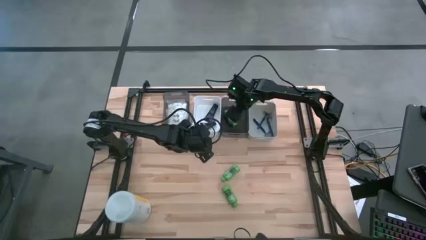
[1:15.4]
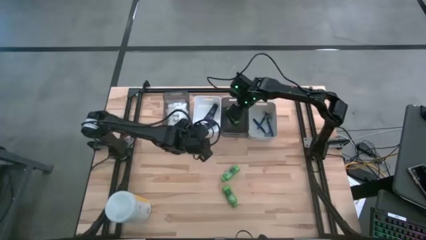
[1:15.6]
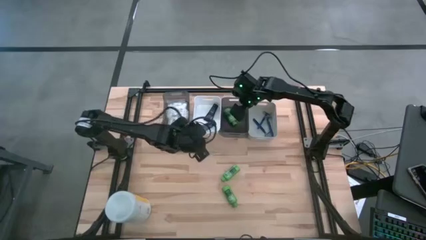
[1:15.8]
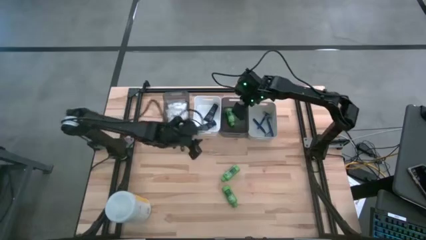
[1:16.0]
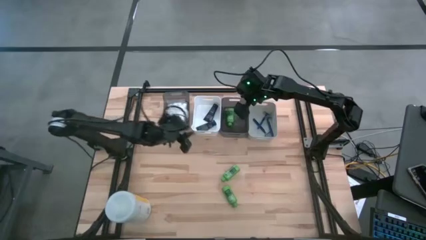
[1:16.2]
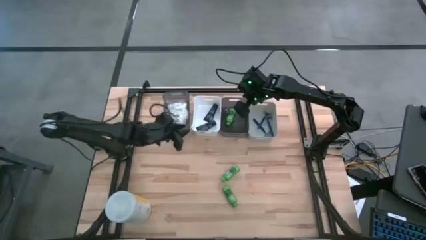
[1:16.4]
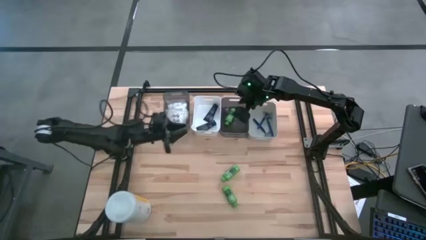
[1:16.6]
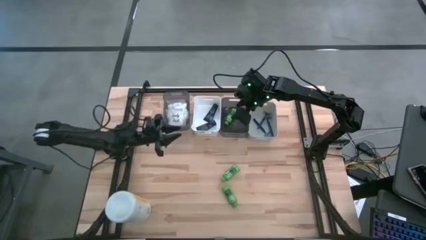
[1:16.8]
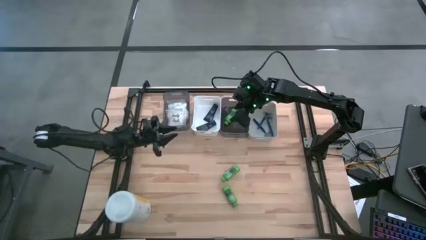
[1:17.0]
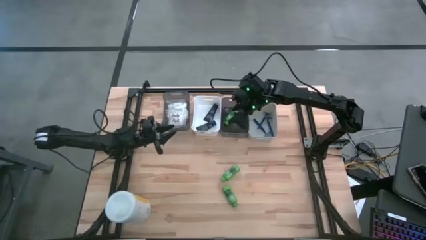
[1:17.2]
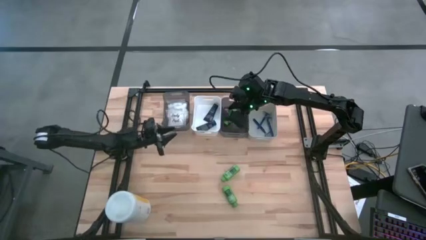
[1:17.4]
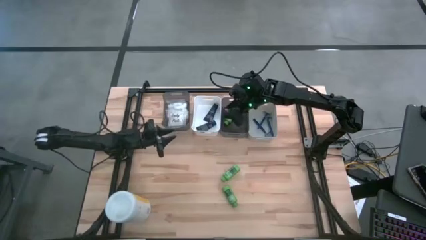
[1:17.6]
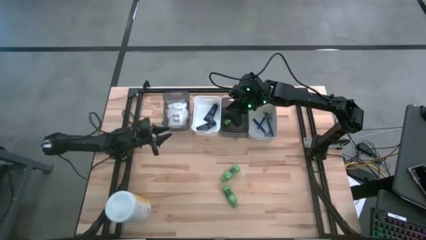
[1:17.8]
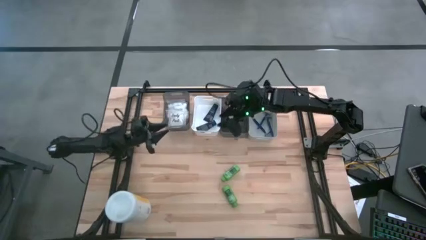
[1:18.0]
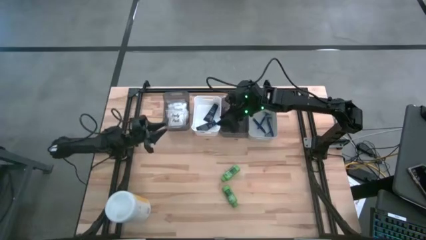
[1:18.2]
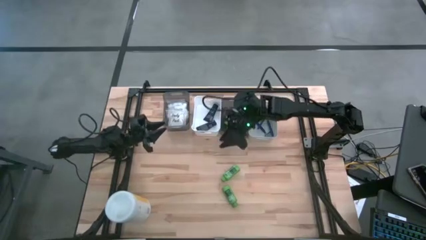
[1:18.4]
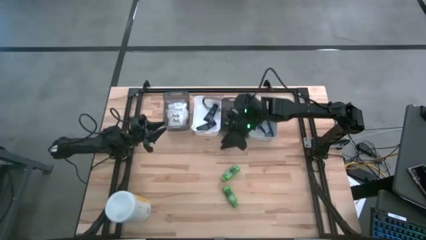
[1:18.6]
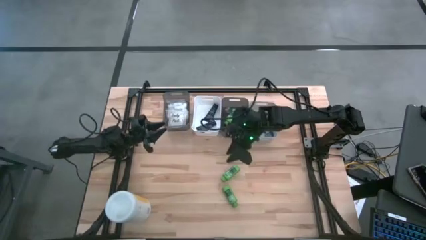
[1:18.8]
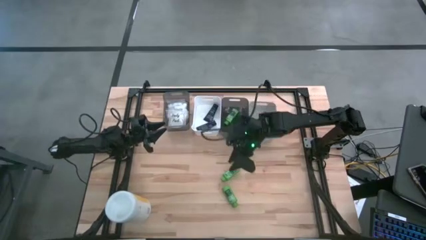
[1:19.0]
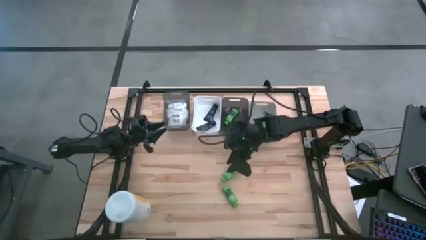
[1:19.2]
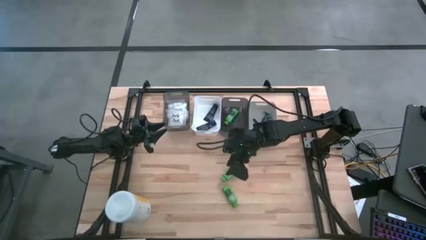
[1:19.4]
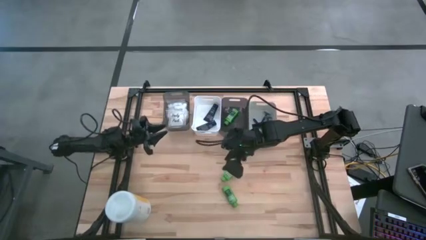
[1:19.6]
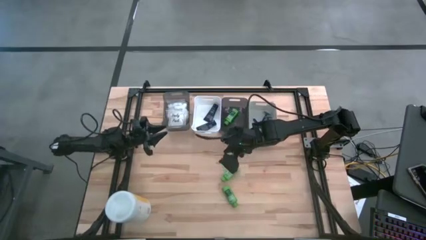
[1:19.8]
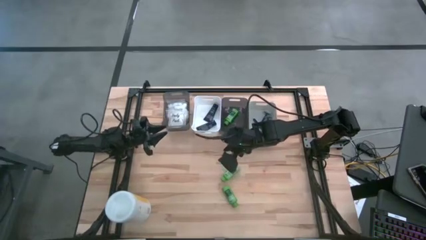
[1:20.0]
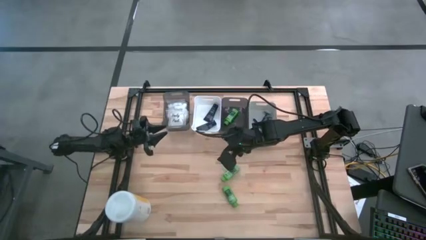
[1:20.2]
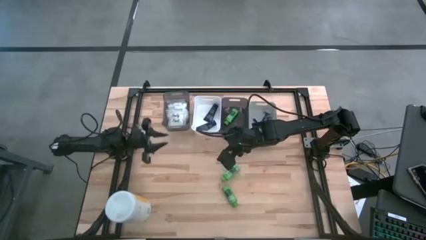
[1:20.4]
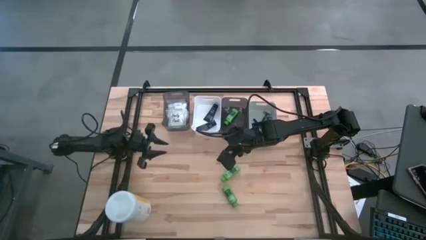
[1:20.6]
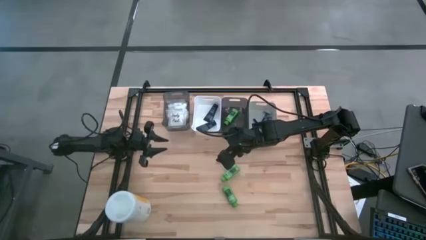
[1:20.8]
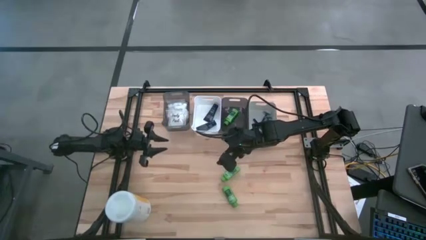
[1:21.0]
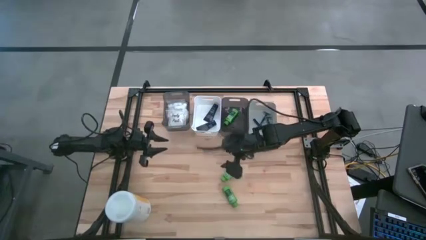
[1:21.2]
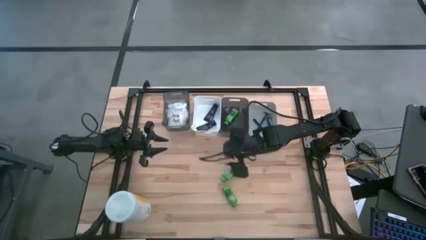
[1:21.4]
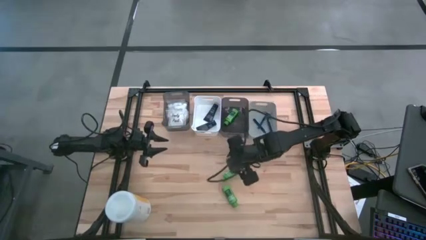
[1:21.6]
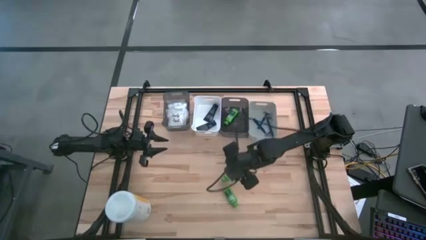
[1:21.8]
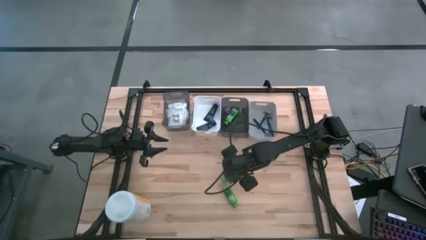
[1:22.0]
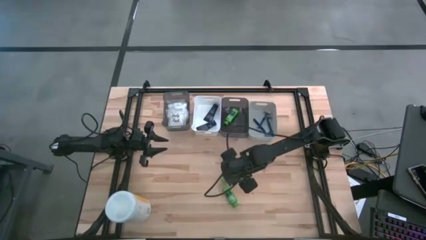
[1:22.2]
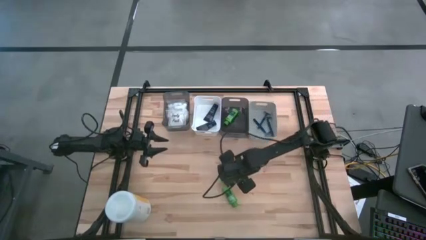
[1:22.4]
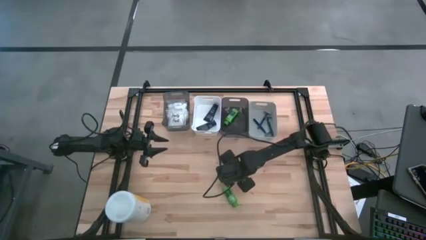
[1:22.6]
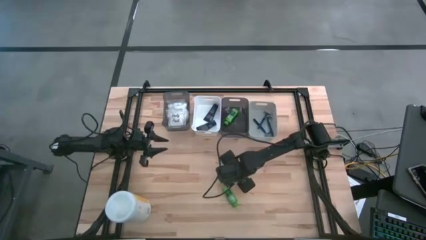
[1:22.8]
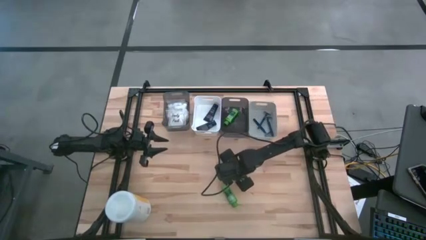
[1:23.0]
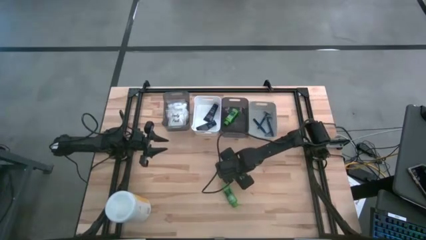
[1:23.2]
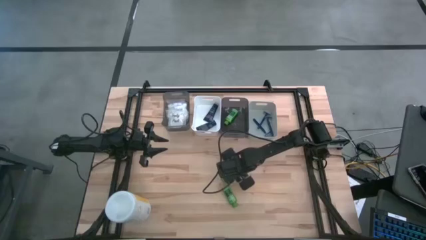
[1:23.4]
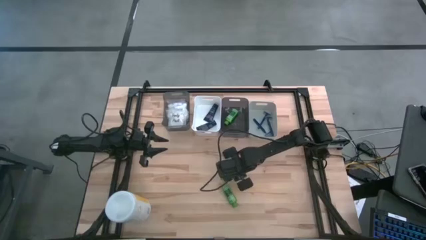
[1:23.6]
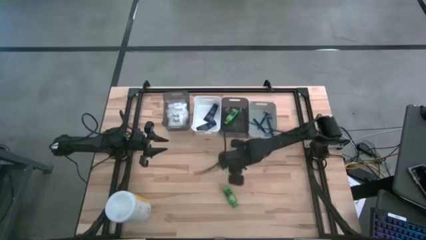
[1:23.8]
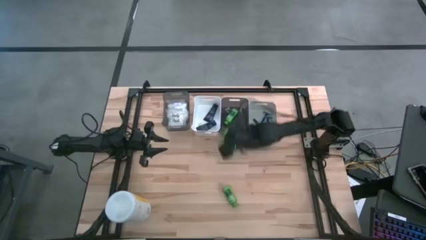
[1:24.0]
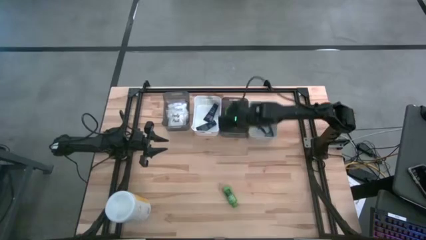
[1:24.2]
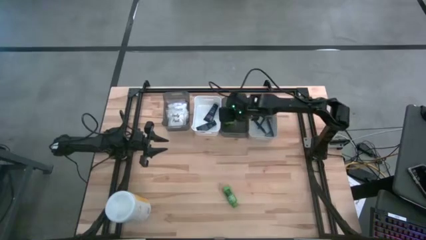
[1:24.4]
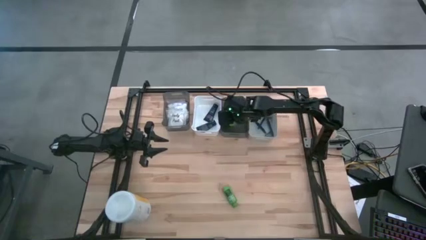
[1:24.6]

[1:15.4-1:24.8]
Task: Pick & Place Travel size toiletries
Put the center shampoo into the right black bin

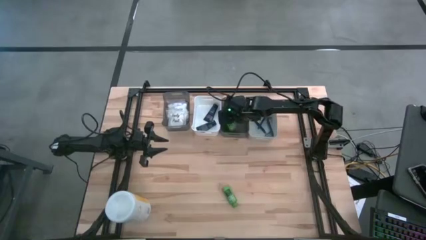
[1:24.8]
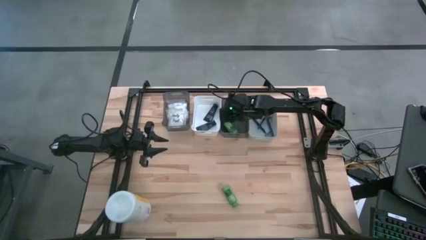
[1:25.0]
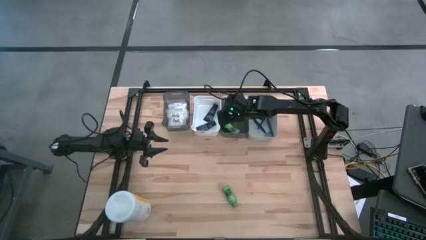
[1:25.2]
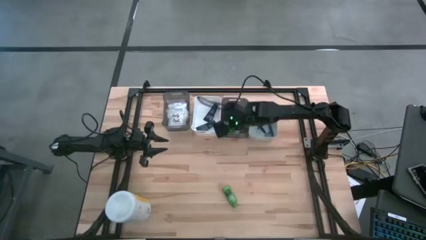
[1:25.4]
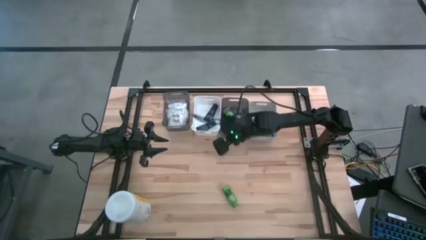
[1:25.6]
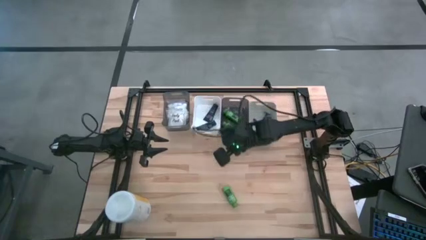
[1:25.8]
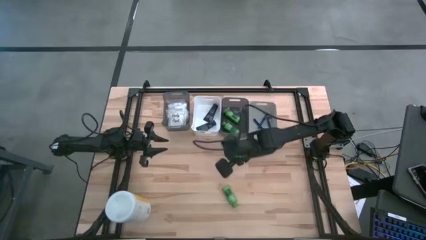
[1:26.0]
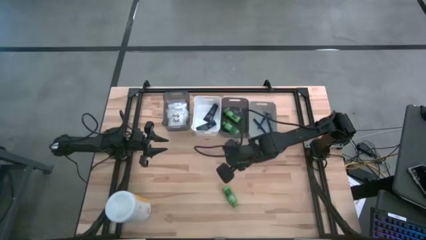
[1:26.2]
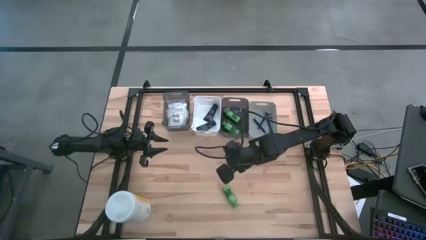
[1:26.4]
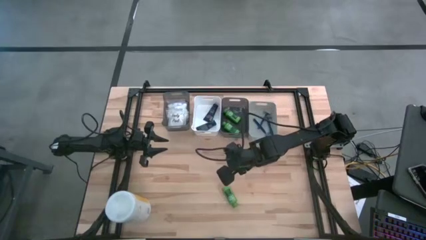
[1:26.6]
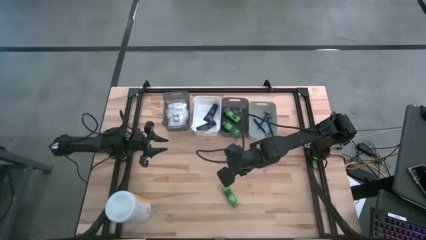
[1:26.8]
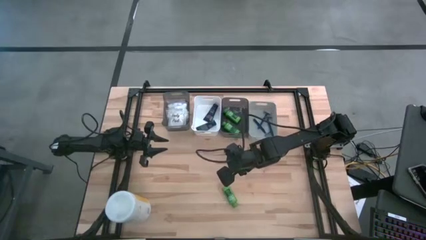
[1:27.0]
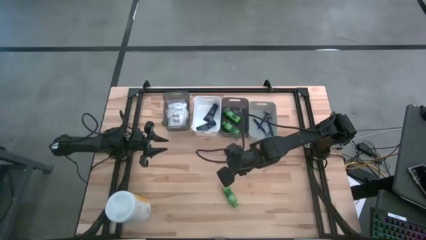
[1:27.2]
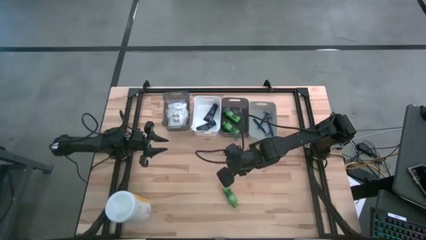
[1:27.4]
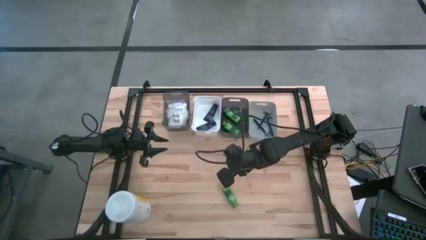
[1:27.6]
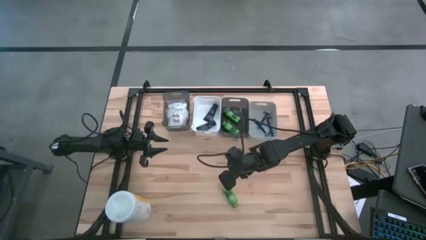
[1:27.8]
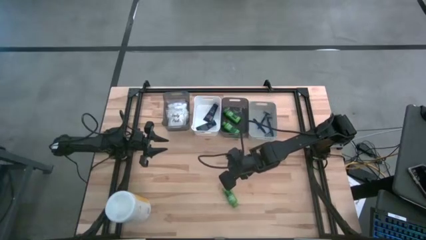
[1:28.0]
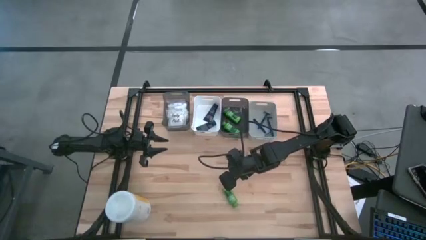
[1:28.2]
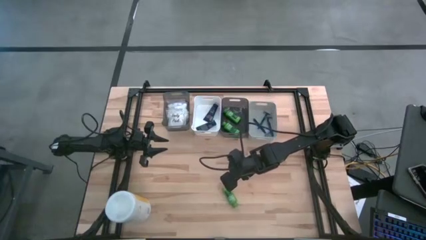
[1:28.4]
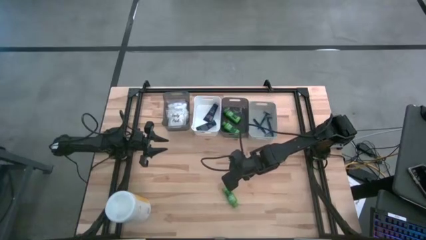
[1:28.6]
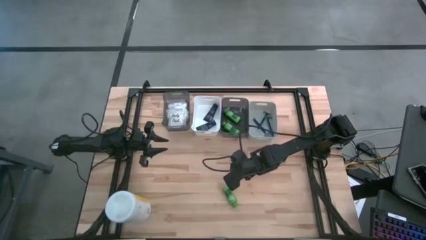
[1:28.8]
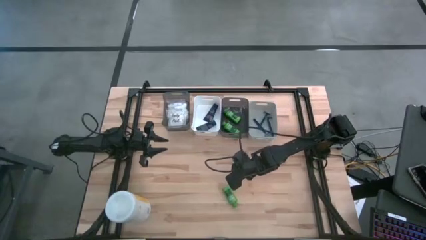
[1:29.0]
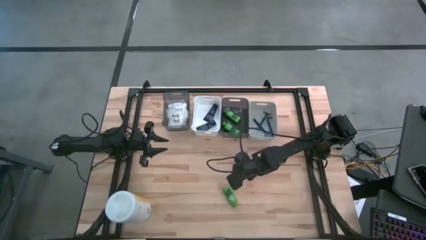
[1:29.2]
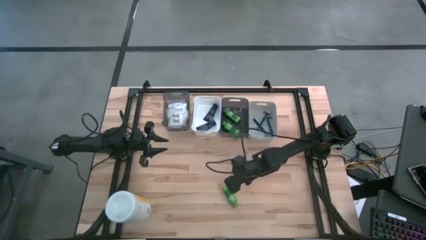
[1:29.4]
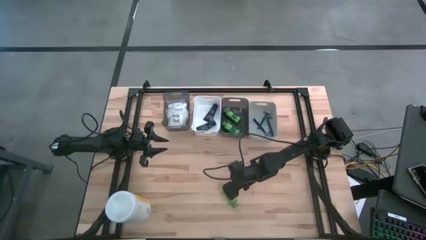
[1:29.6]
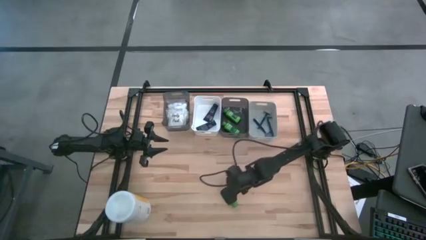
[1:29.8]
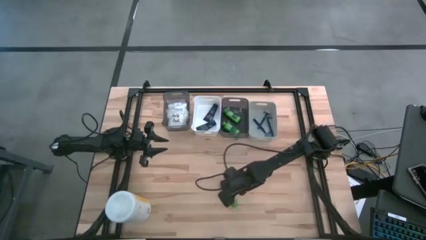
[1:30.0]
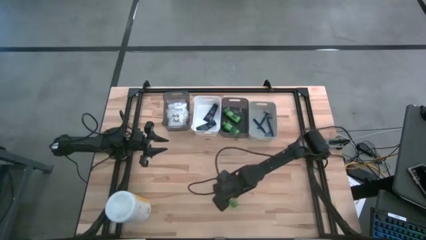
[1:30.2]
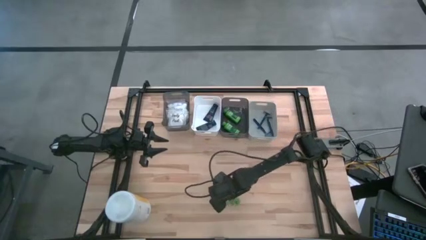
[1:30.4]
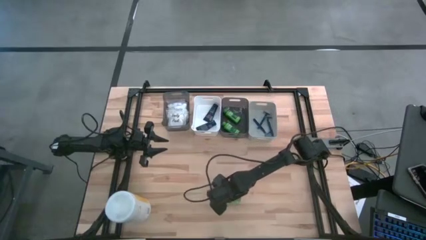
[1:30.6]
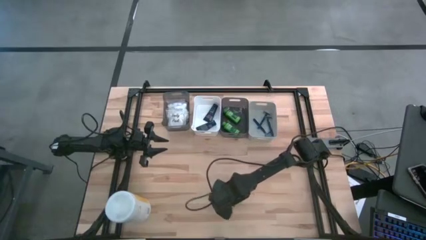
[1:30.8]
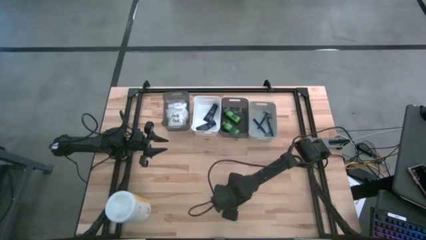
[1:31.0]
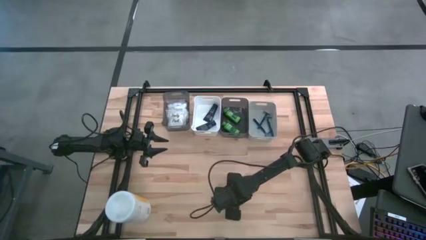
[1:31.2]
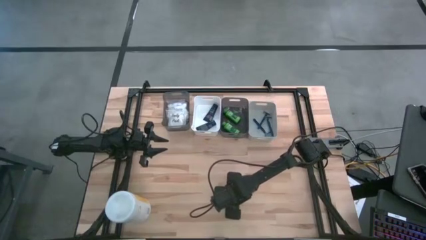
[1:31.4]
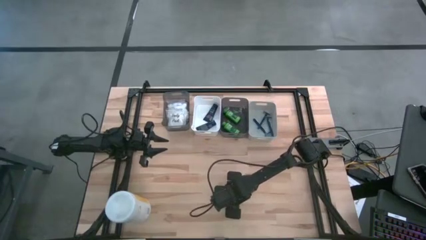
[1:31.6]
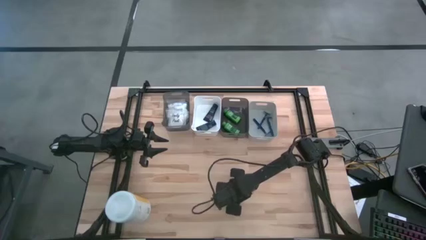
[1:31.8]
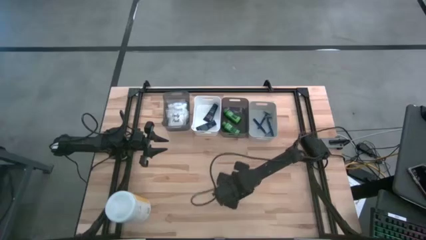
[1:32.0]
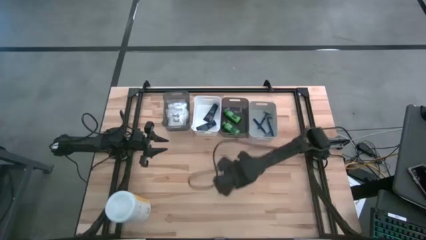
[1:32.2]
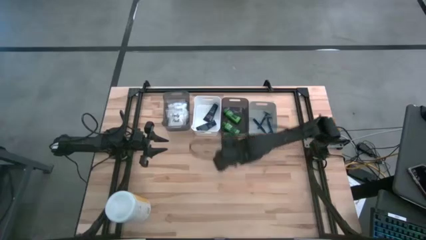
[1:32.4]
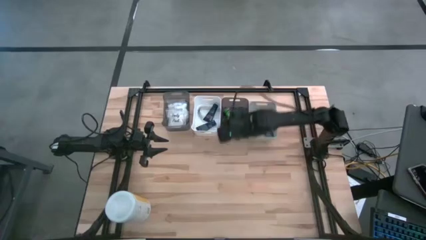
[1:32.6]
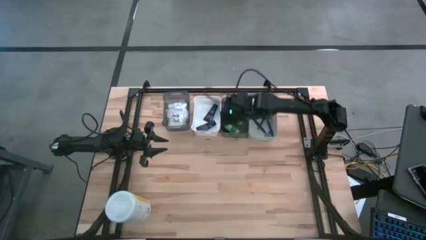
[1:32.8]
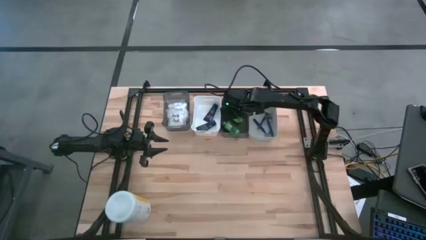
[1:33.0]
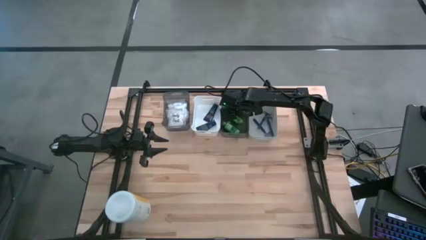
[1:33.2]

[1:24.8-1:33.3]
Put the shampoo into the right black bin
